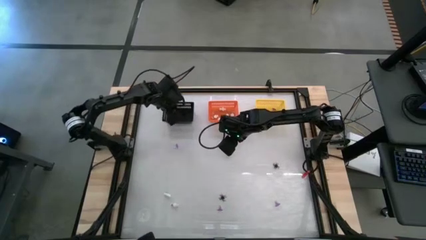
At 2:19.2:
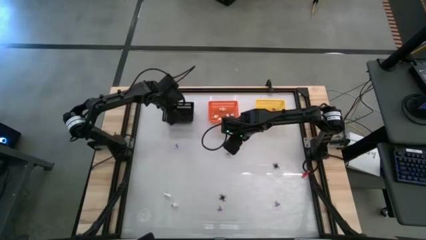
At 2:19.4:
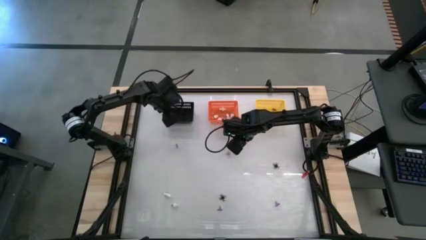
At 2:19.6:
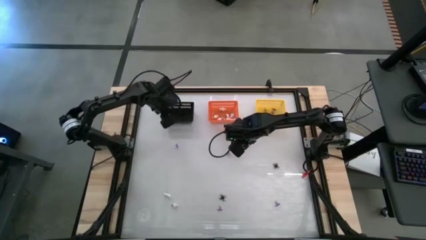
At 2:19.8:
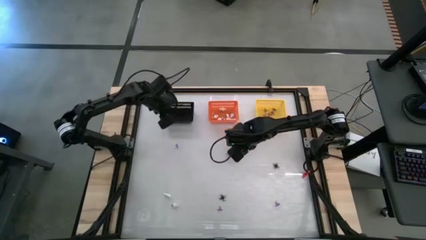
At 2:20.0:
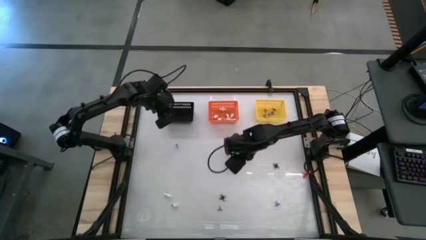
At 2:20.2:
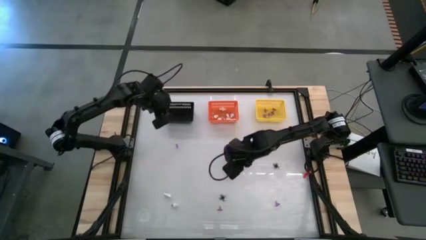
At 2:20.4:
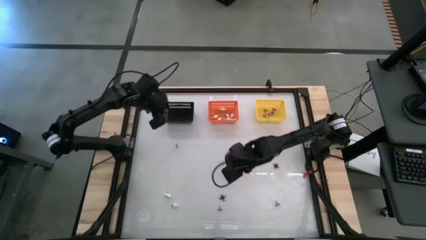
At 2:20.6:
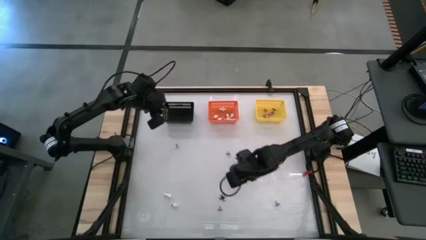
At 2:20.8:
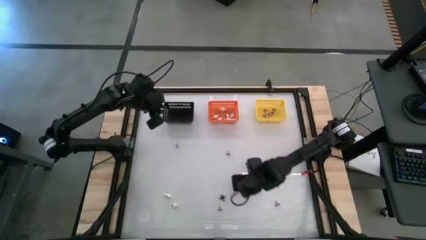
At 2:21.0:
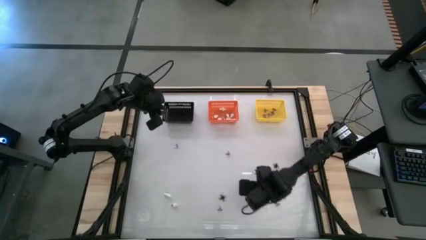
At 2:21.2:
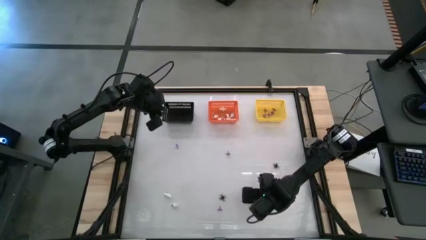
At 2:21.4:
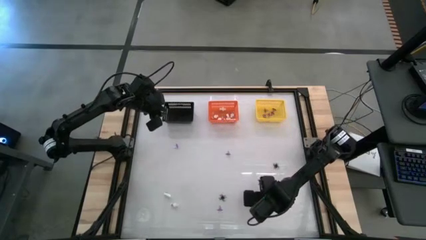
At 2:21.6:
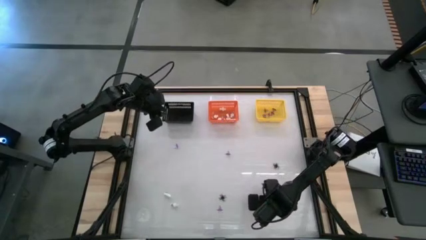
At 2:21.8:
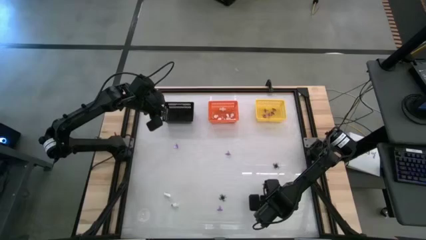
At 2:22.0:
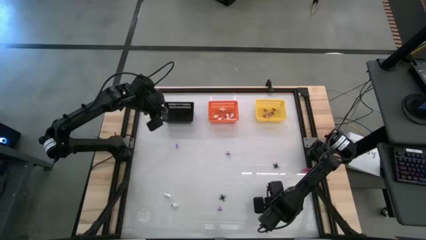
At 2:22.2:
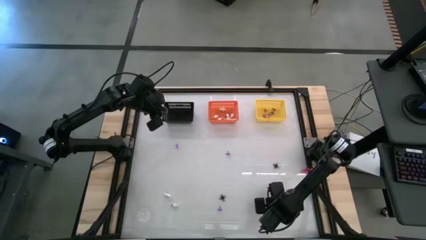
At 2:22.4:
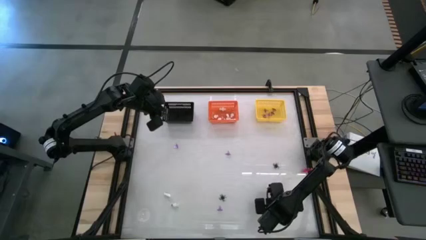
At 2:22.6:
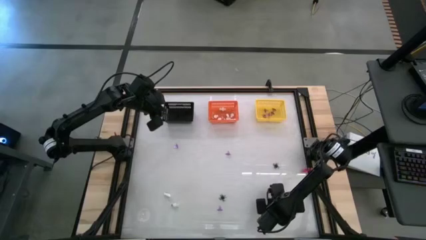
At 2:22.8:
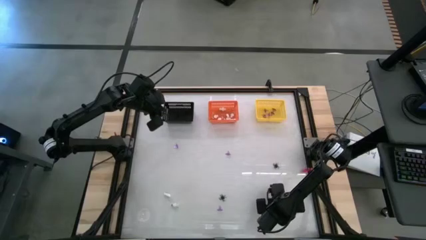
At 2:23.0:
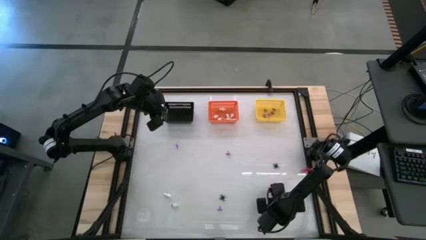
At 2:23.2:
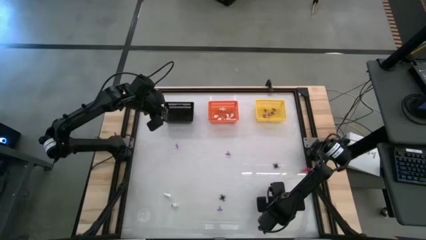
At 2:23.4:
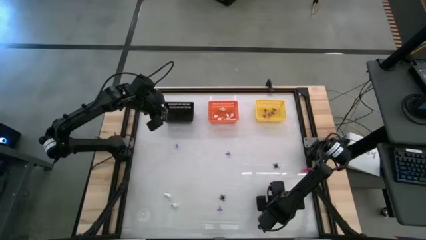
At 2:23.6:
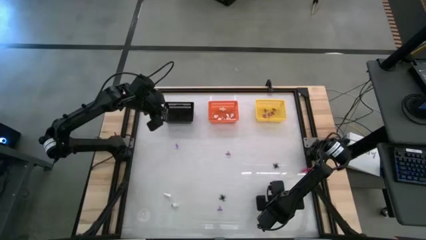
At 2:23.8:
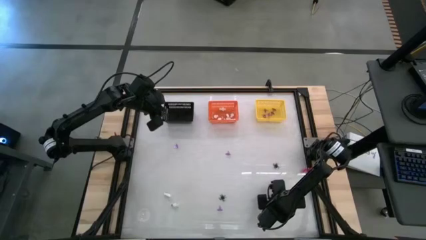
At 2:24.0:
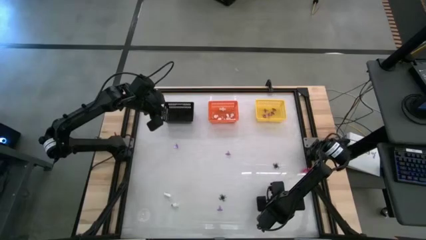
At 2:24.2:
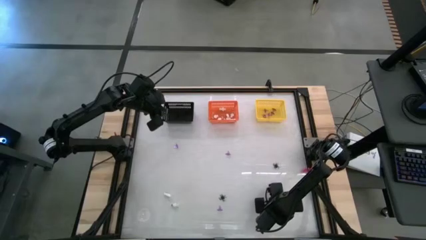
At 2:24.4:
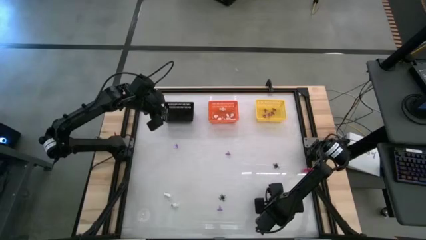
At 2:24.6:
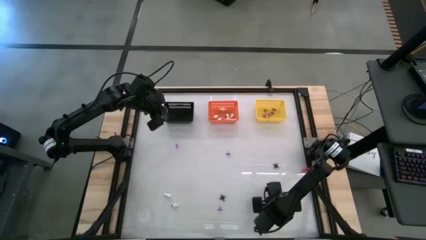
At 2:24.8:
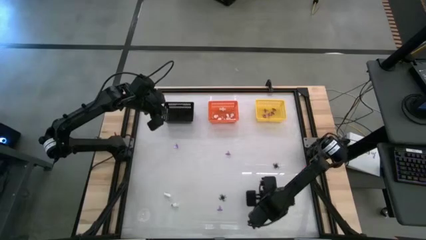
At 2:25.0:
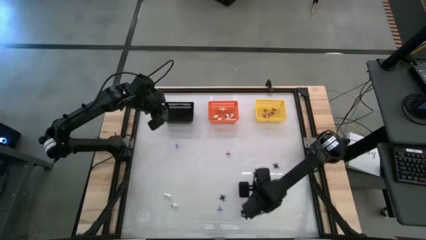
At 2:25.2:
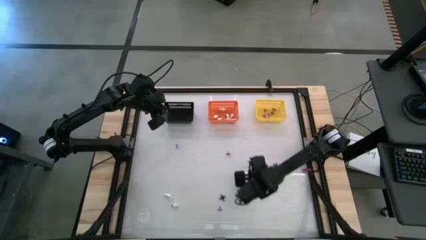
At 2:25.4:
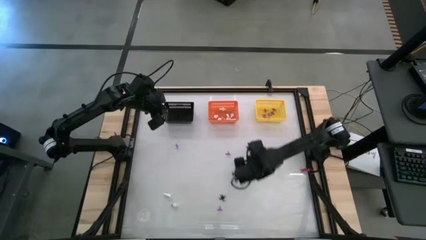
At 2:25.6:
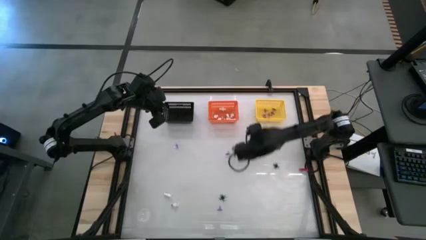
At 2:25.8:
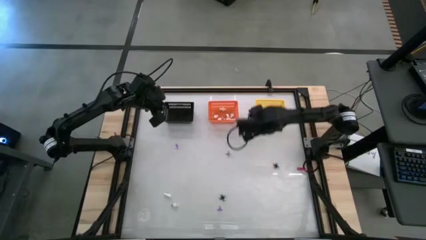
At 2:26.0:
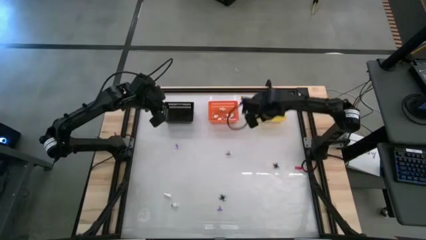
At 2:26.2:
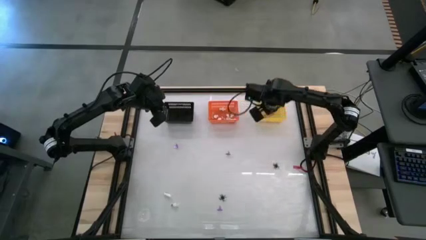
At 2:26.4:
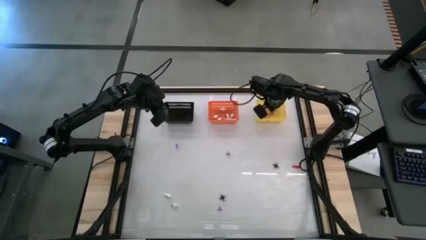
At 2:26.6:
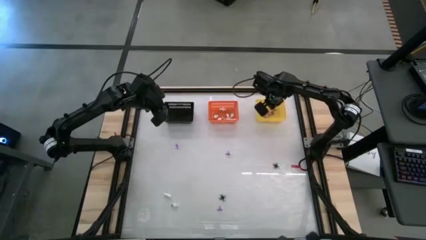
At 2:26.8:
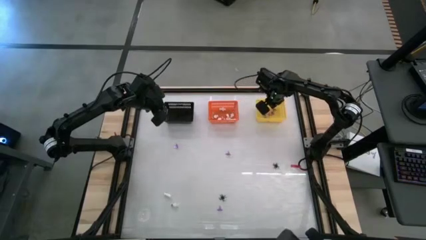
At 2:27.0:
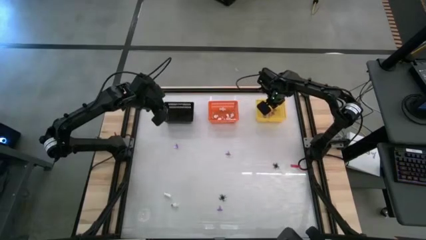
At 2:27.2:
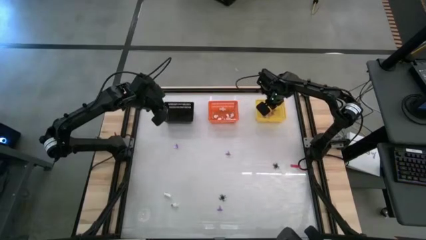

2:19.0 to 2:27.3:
Task: Sort Halloween decoration
Put the witch hat toy into the yellow bin

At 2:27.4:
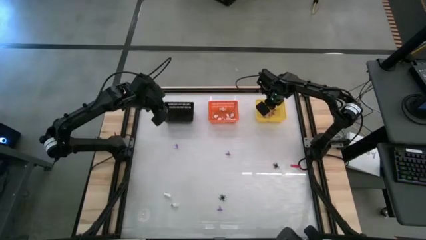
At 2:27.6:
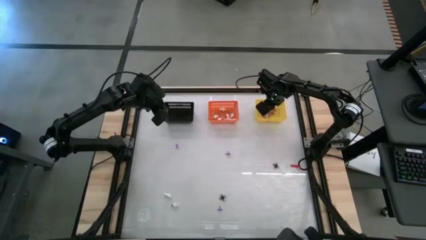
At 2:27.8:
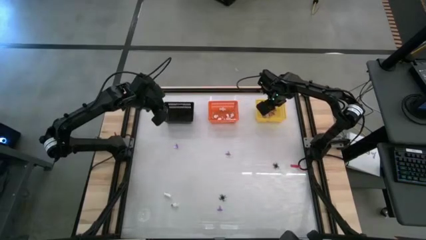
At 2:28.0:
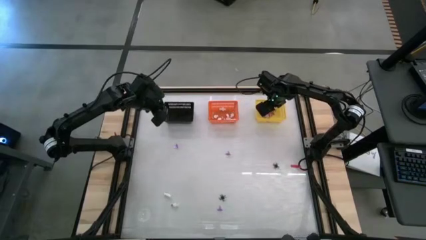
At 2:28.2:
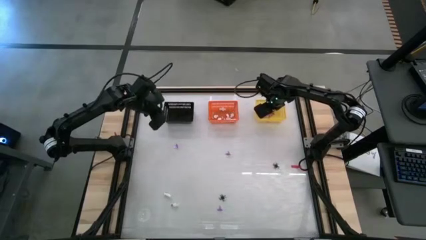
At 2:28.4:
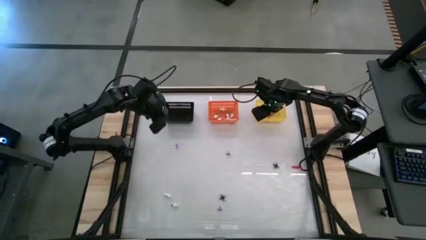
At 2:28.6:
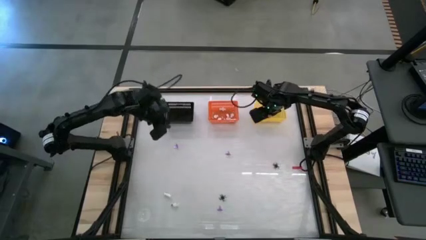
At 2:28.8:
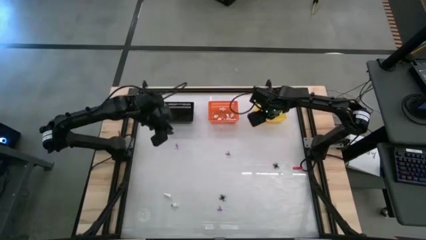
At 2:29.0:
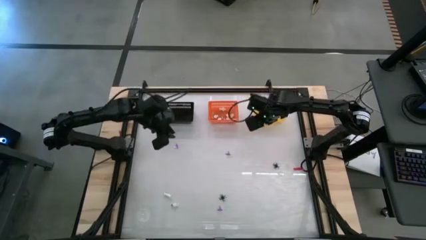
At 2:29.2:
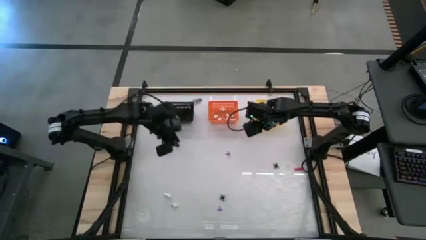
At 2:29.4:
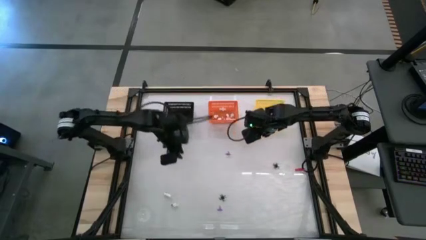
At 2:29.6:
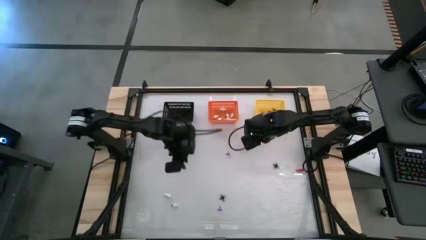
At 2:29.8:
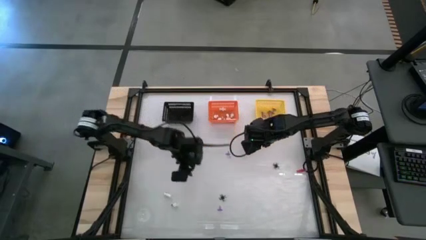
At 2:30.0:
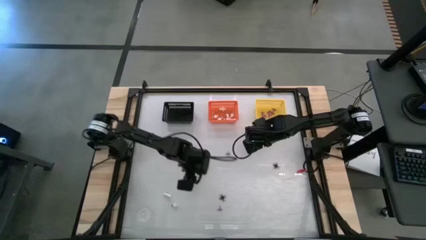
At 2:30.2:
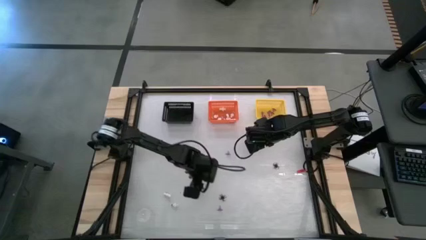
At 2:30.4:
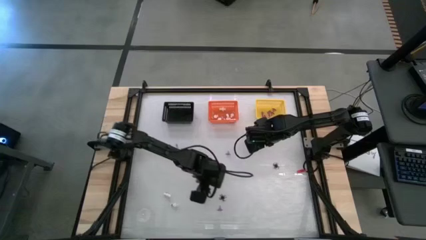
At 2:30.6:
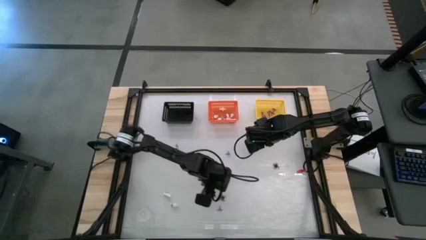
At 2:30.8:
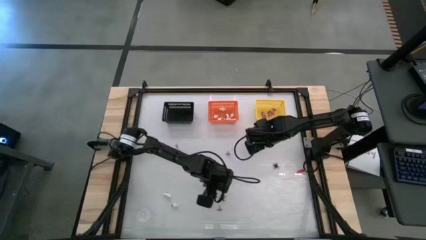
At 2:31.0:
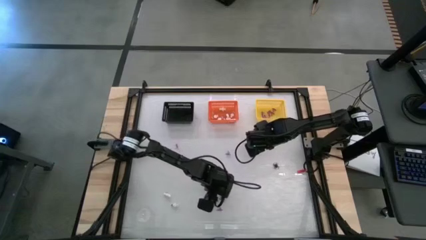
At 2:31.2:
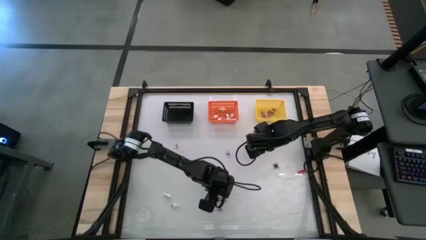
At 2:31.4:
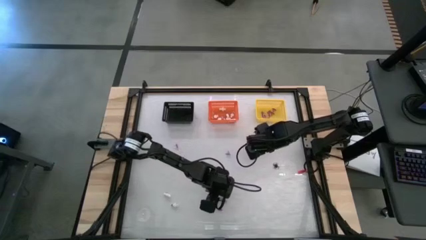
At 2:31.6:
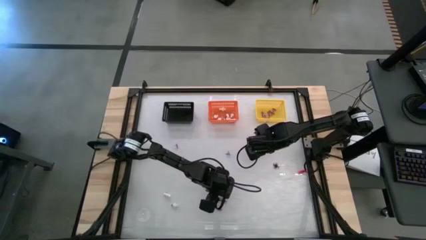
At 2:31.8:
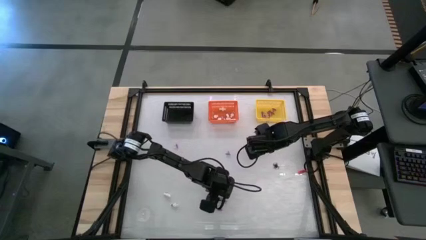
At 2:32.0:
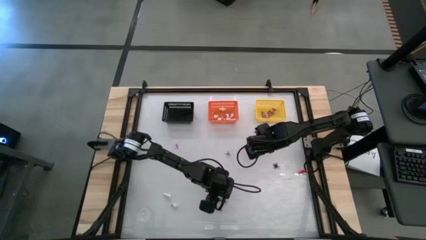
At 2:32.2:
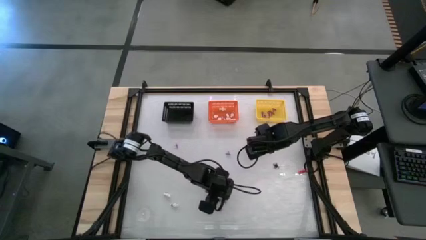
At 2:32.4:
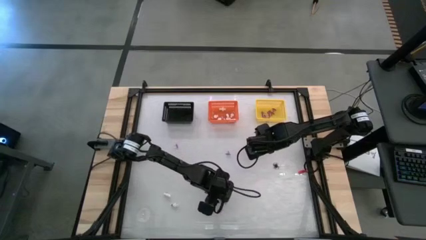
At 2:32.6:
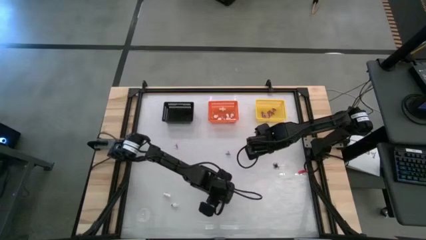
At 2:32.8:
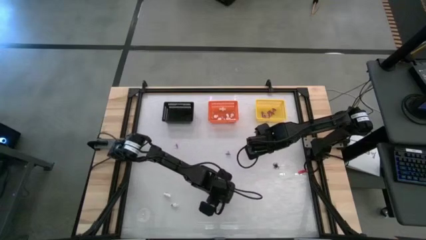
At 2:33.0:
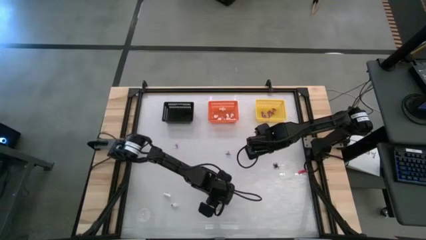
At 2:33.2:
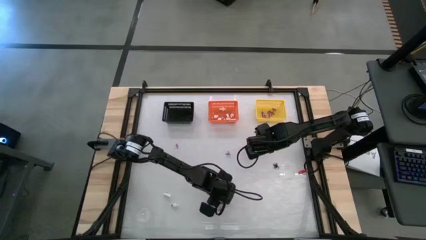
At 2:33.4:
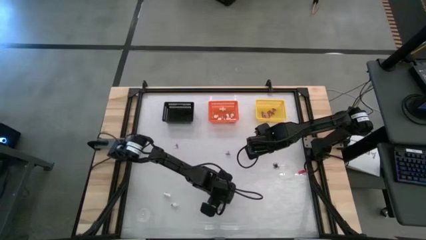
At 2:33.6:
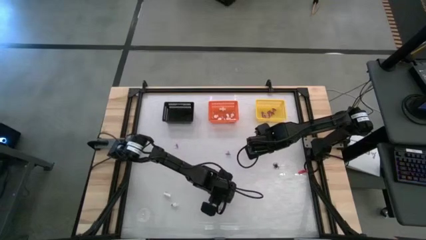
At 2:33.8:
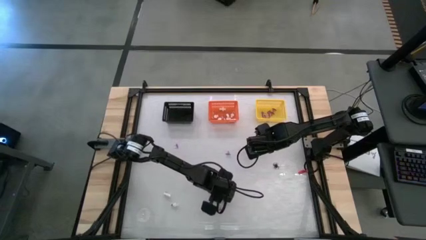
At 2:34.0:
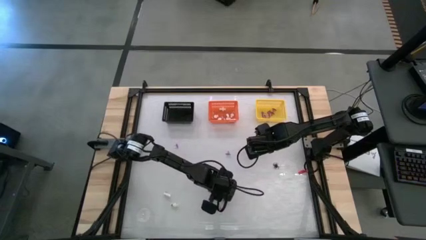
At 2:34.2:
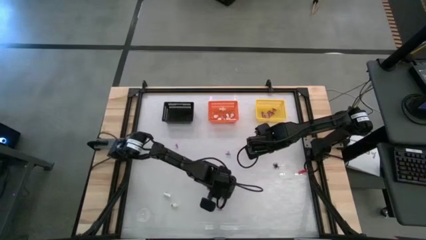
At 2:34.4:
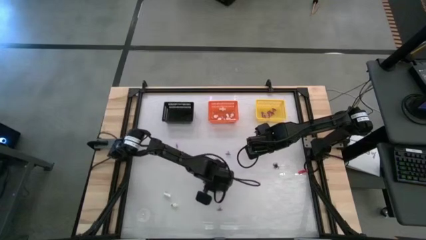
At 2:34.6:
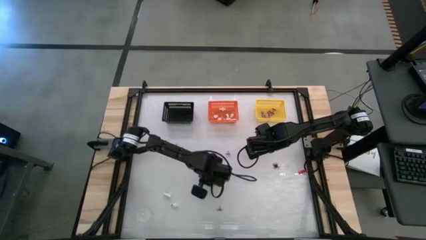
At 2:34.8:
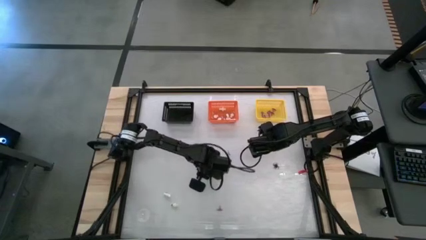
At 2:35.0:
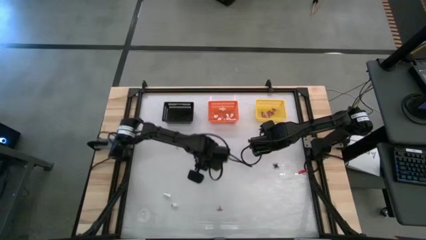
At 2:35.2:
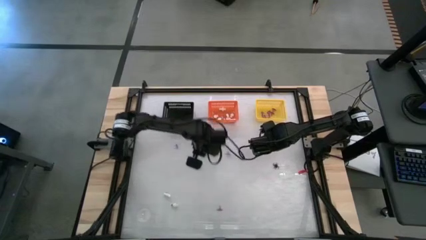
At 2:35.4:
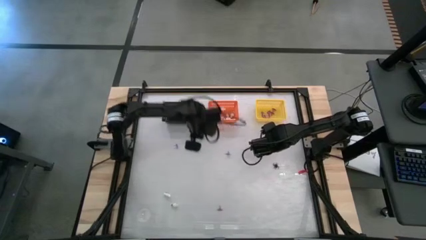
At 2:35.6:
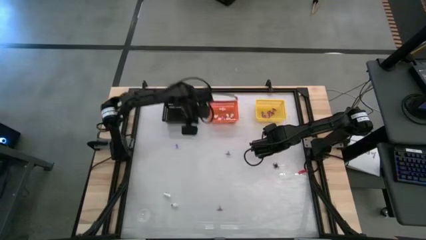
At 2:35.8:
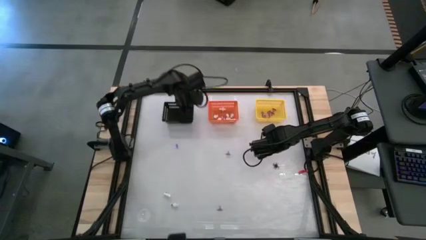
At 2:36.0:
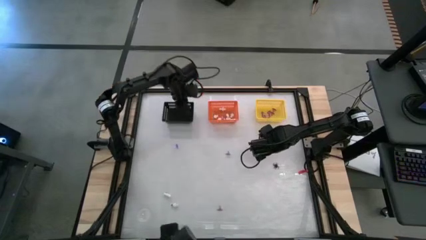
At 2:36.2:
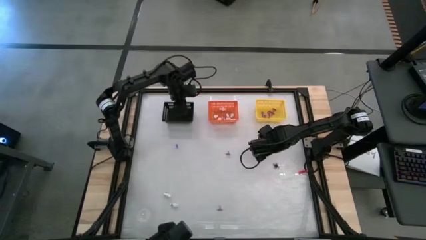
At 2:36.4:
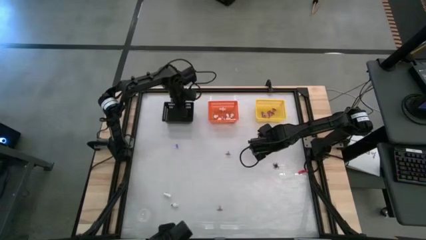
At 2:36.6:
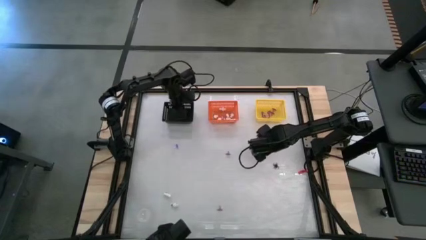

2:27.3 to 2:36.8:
Put the bottom spider toy into the black bin
